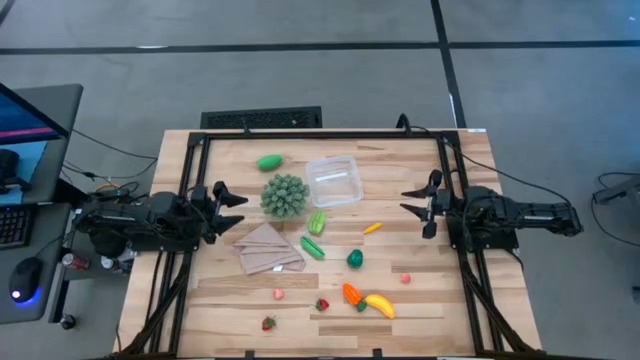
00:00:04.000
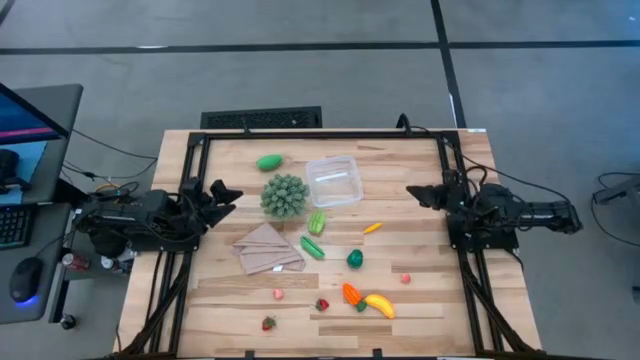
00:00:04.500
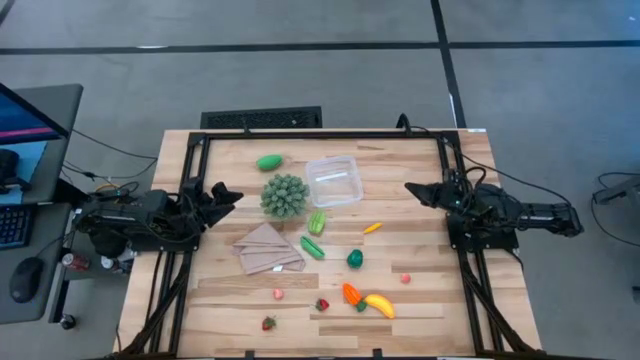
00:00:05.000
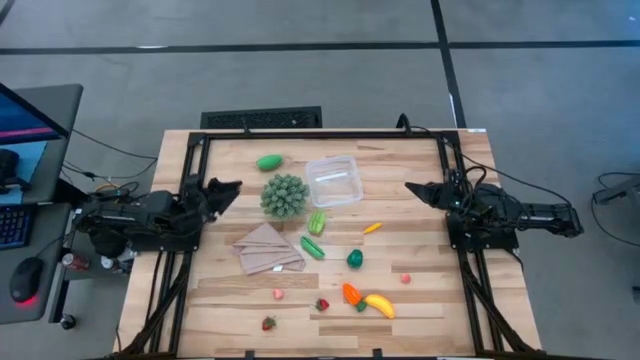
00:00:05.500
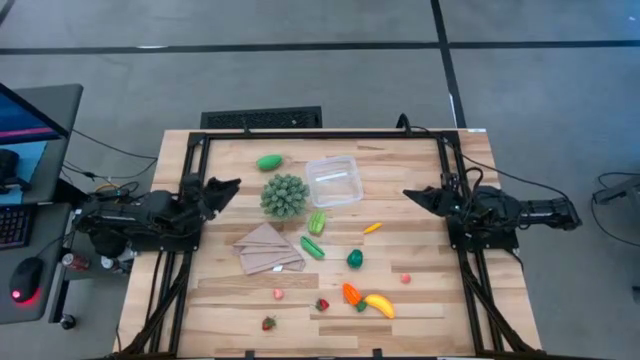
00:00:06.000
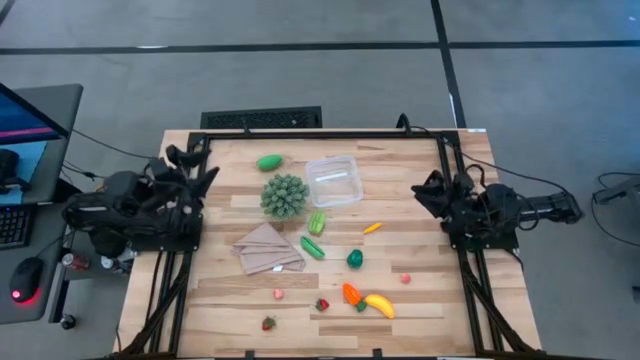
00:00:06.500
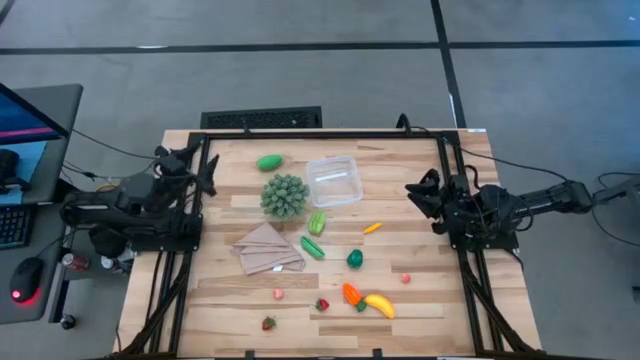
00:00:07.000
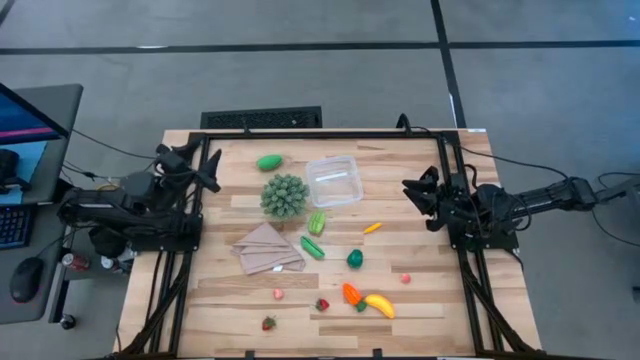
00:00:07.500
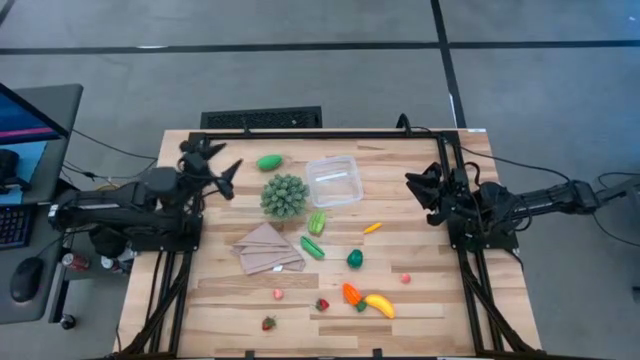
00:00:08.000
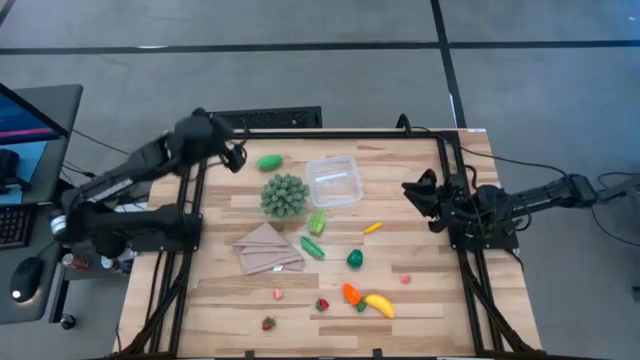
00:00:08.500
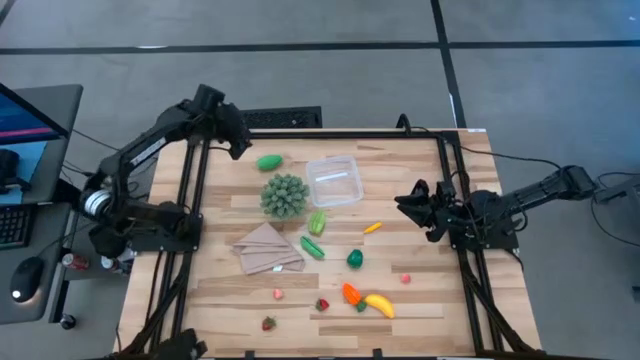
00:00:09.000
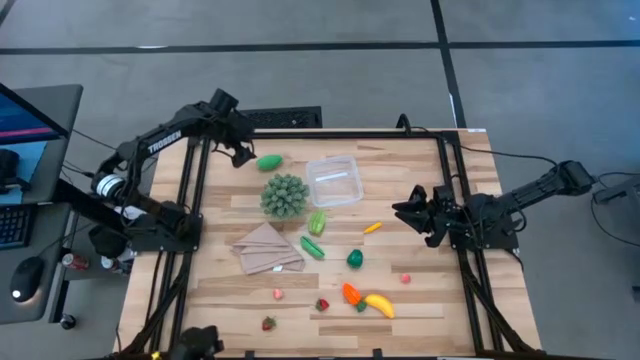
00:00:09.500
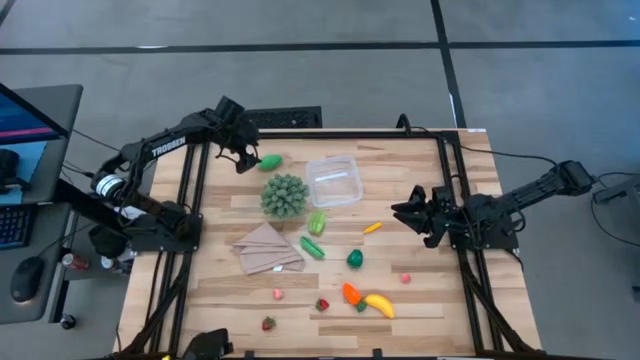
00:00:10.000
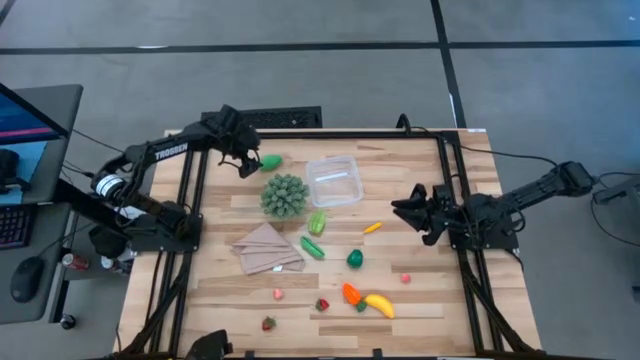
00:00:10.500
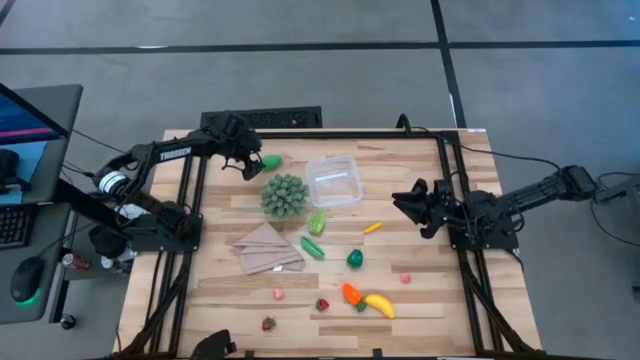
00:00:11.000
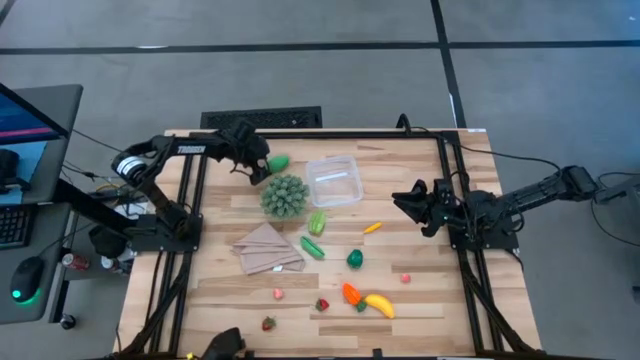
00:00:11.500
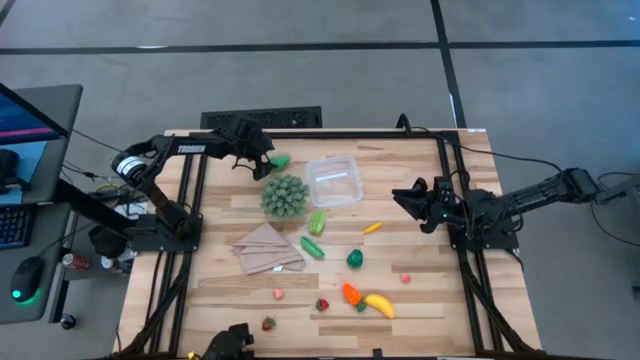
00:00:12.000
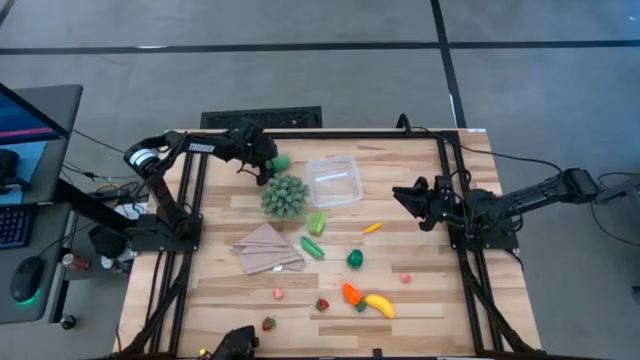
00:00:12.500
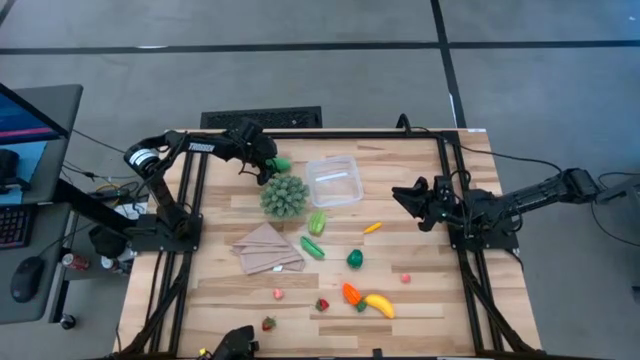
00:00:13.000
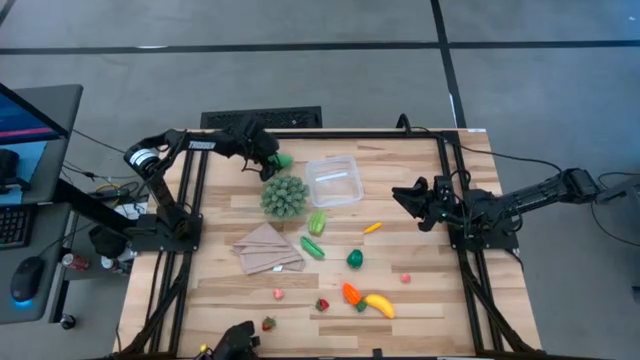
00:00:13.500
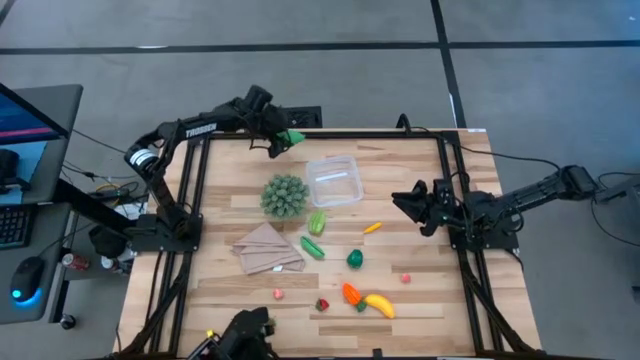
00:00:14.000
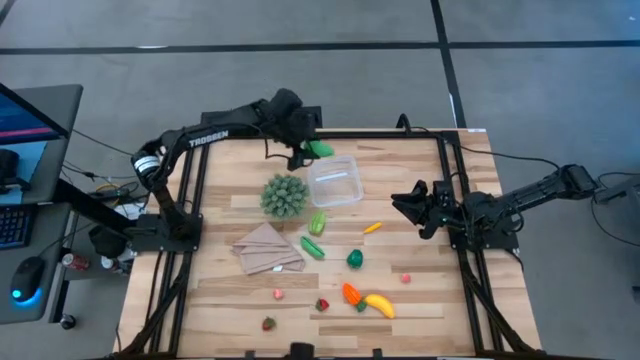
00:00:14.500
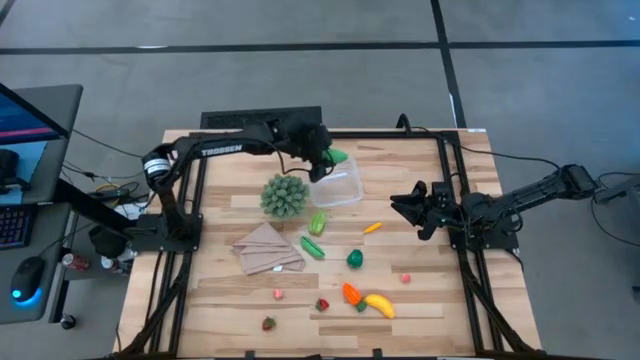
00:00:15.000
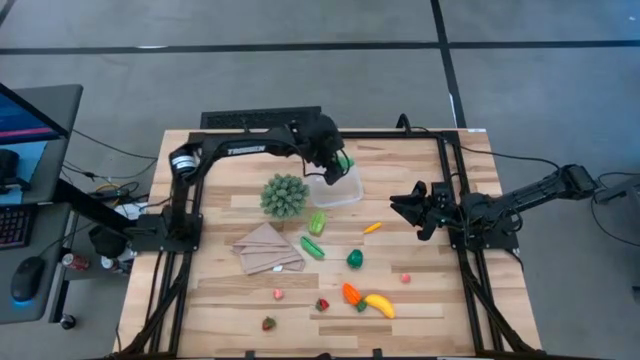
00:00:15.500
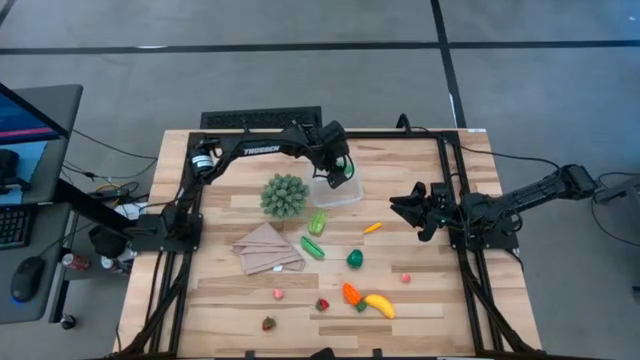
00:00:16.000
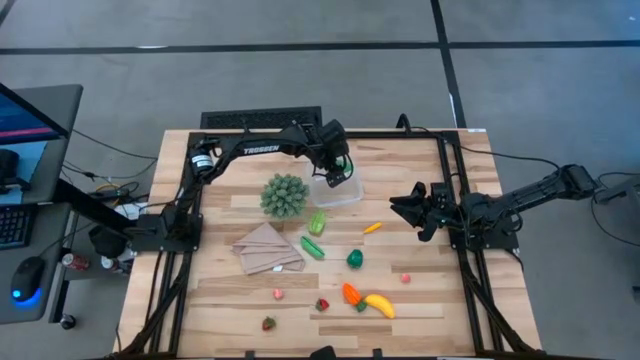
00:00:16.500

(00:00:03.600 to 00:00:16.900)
Task: Pick and placing Produce into tupperware
Put the corn into the transparent bin
